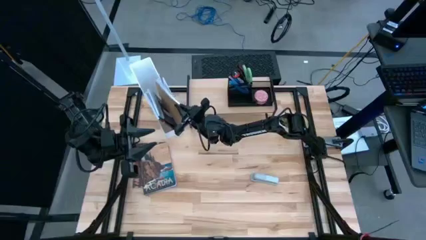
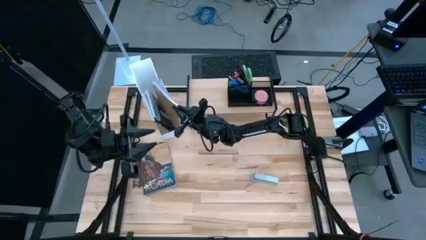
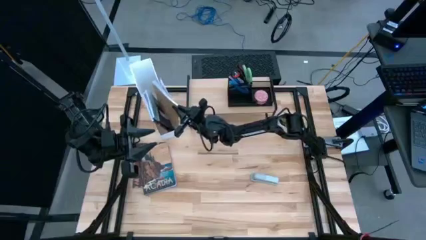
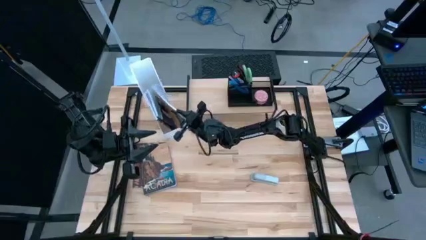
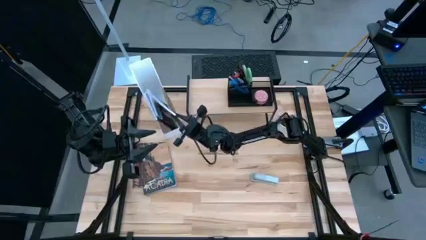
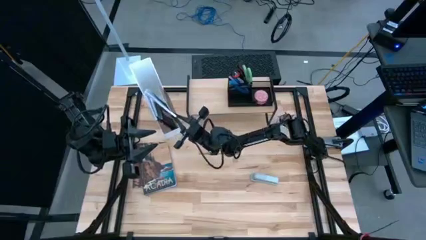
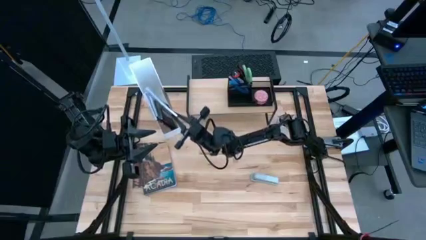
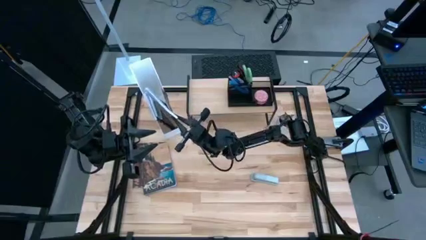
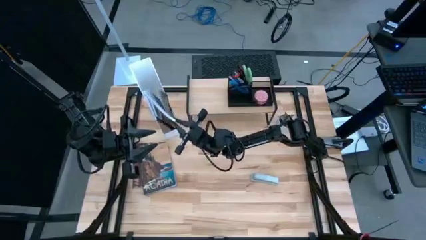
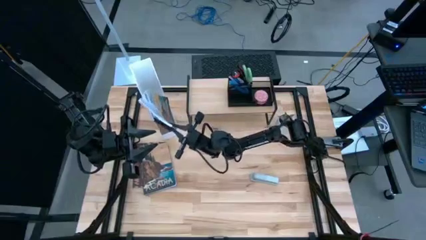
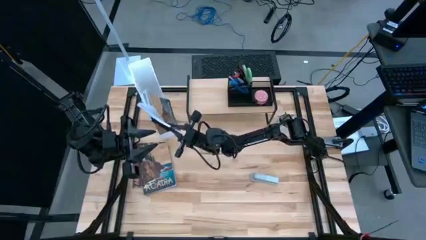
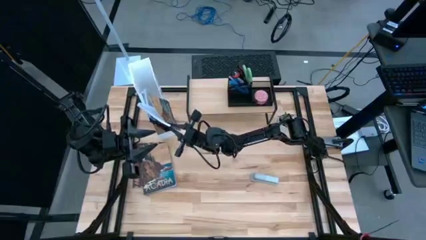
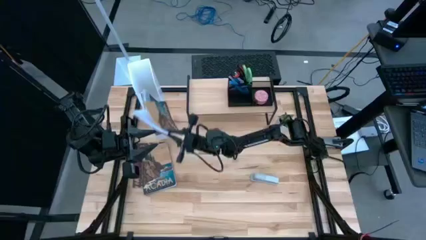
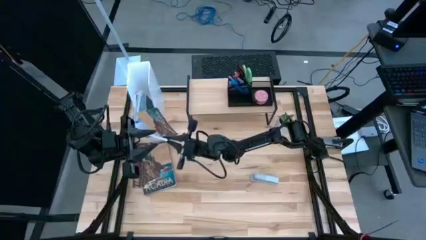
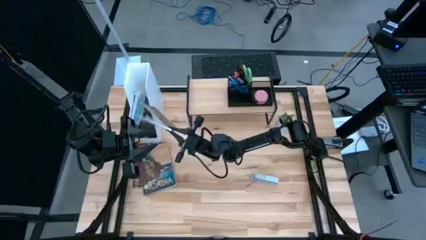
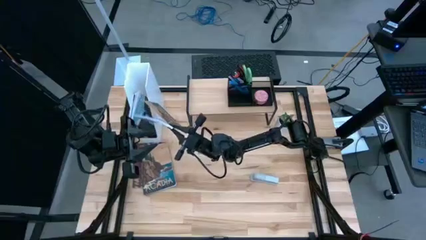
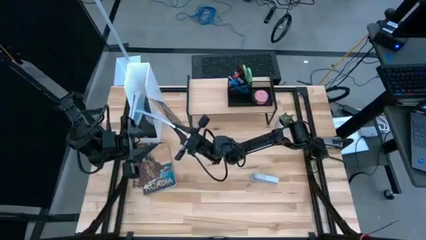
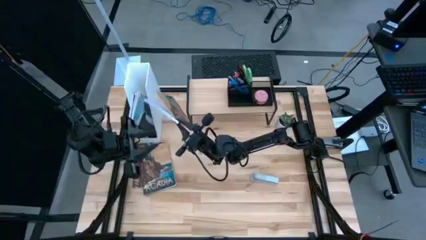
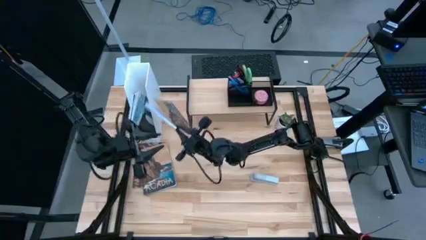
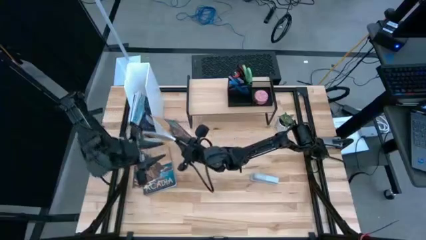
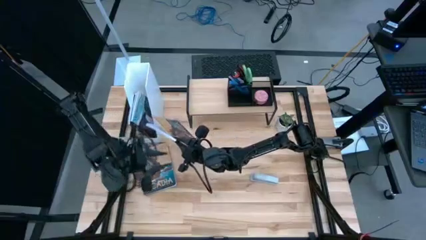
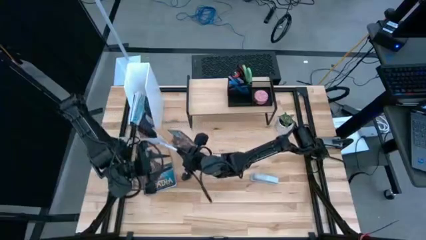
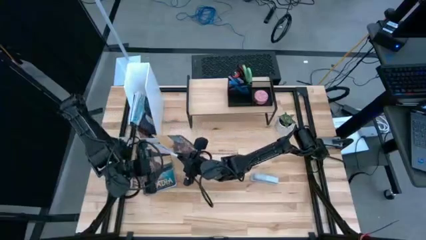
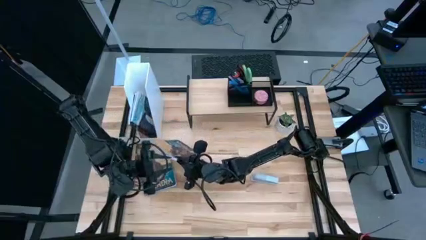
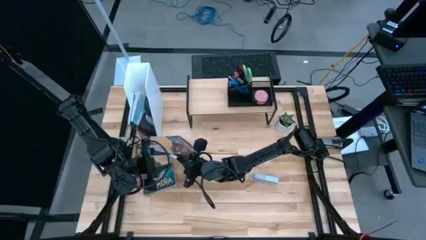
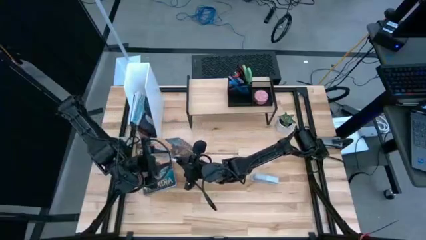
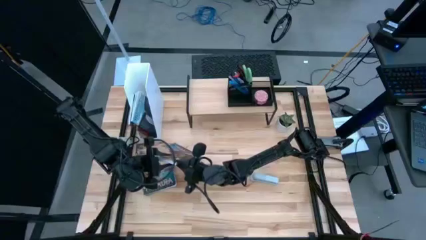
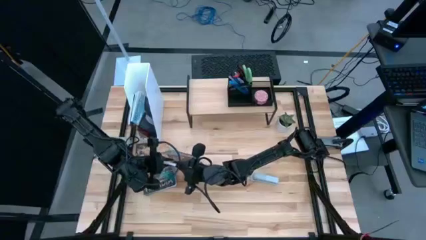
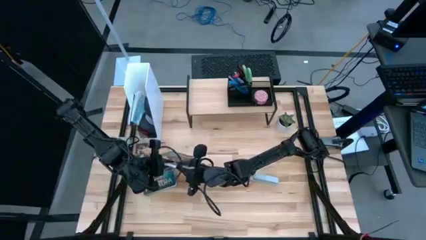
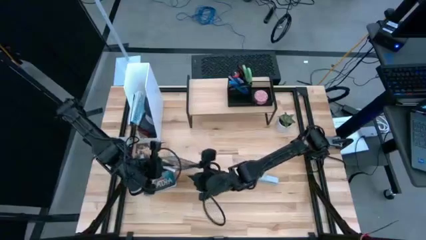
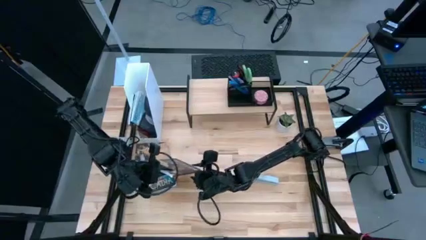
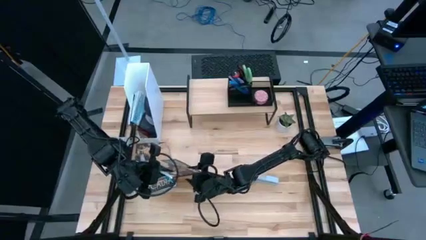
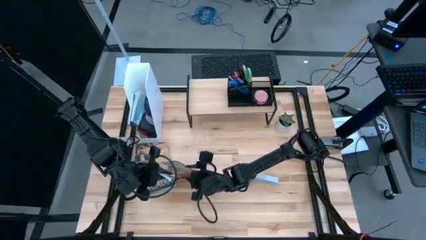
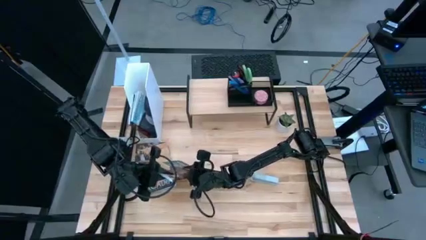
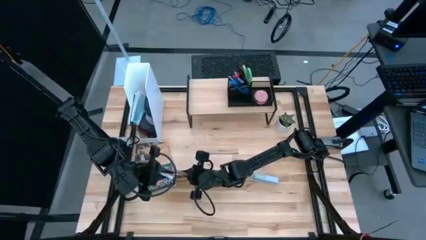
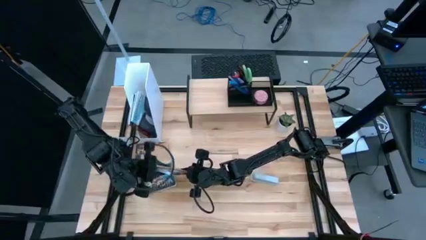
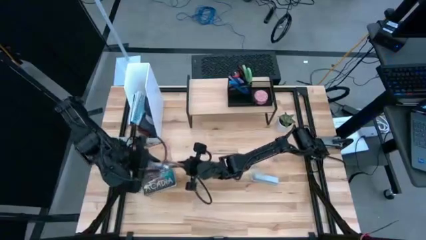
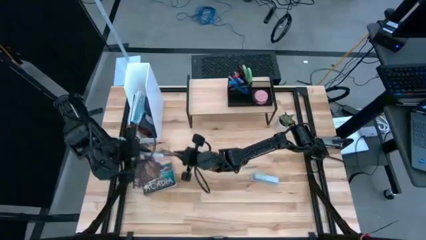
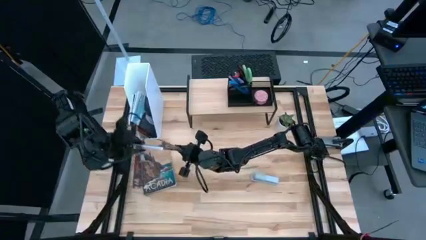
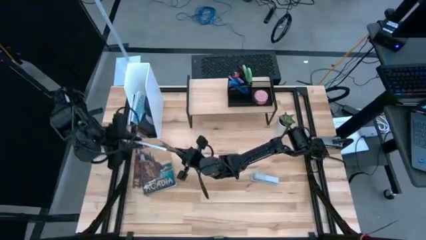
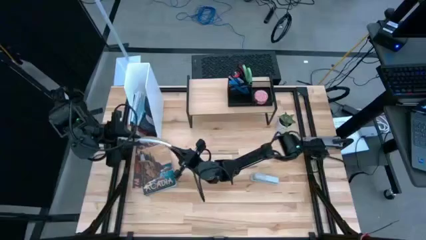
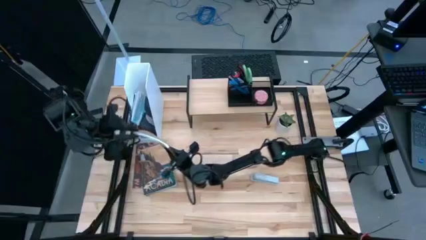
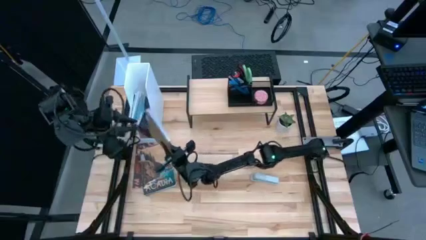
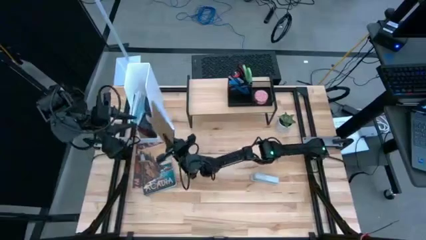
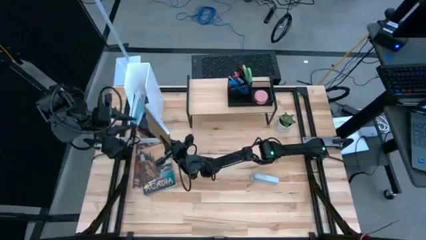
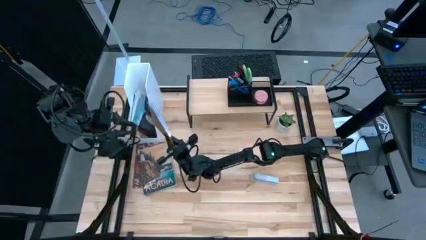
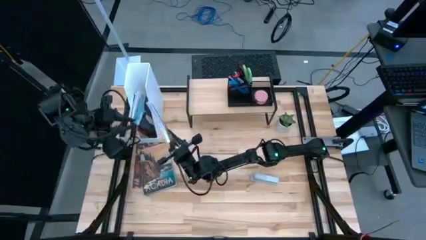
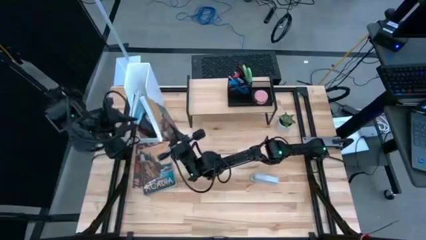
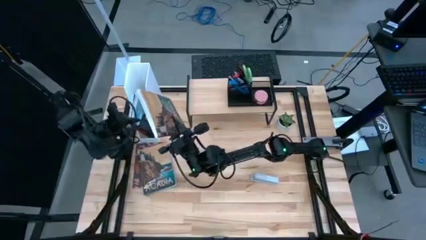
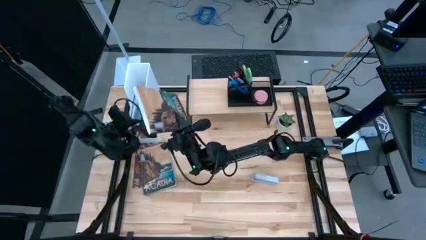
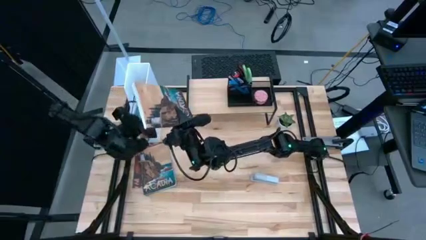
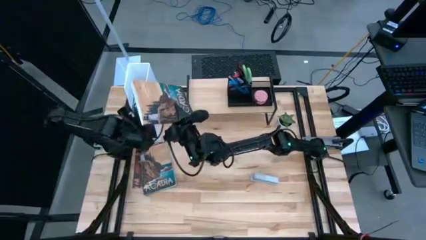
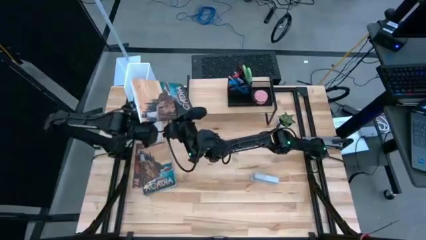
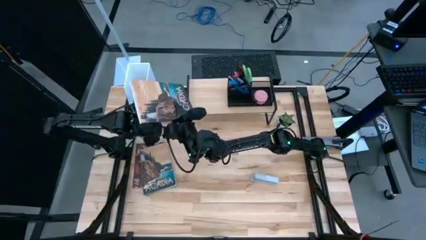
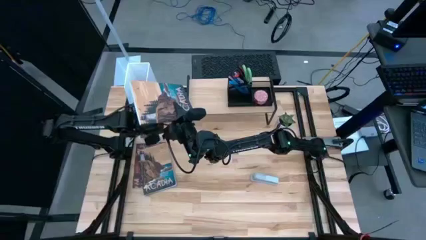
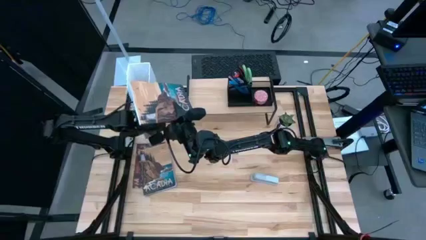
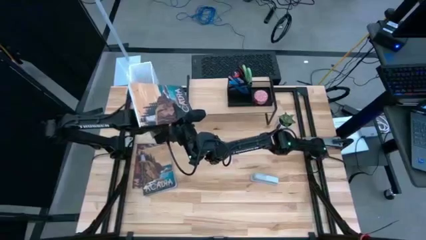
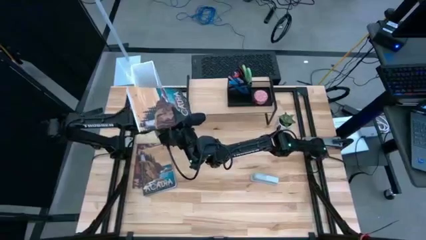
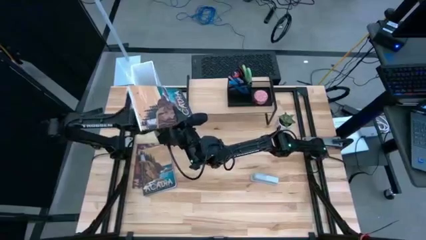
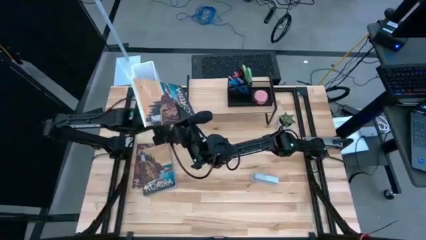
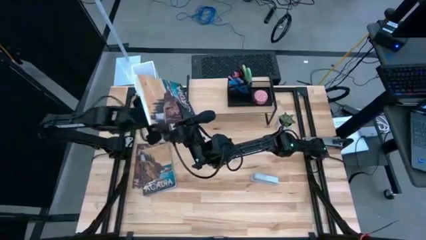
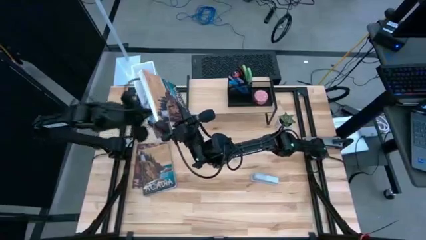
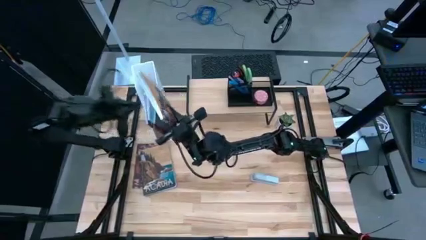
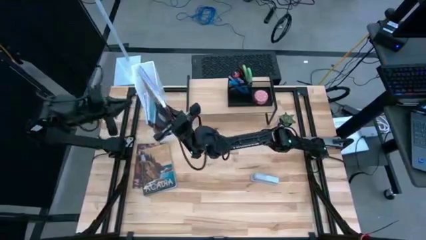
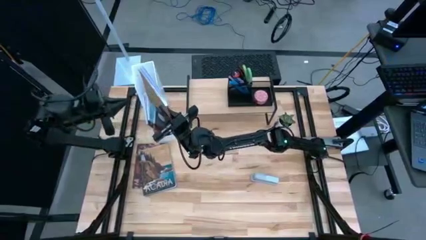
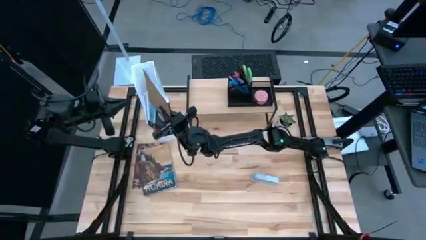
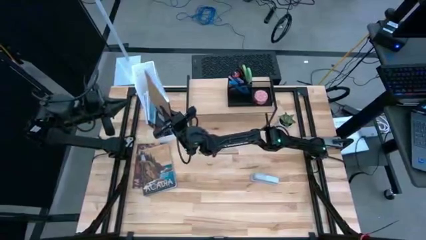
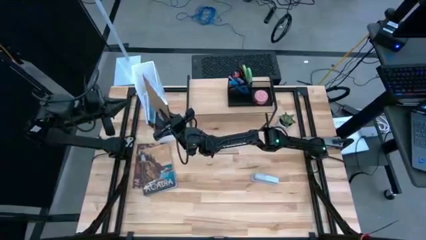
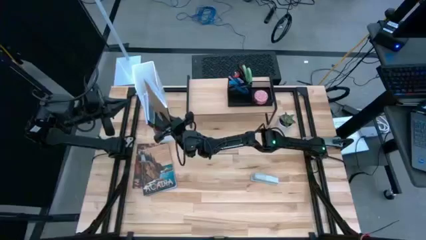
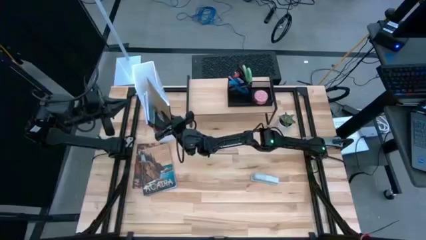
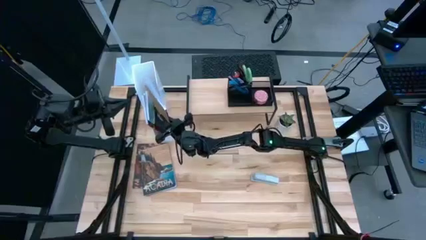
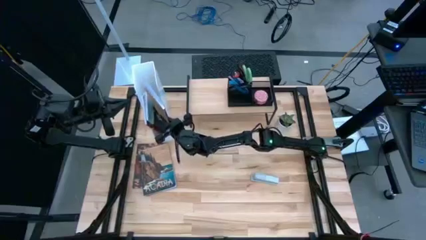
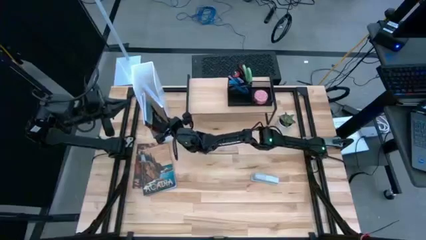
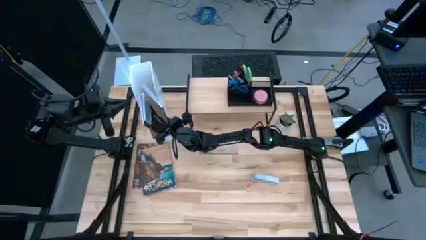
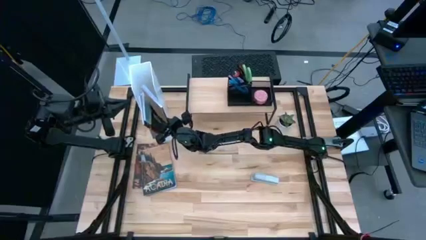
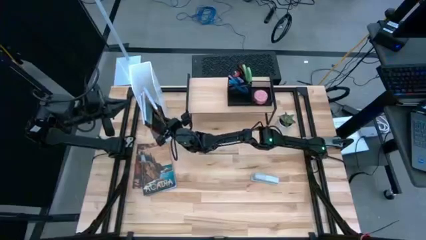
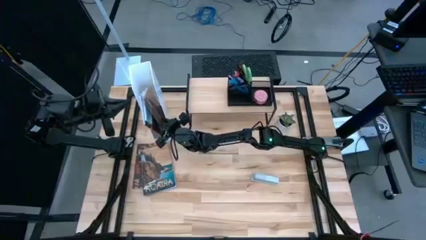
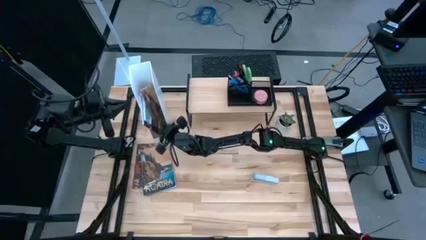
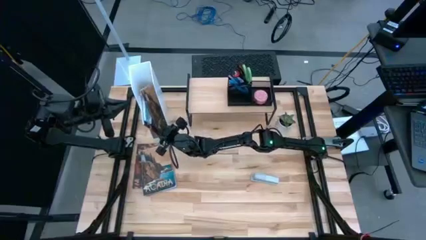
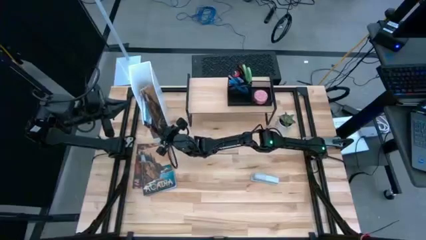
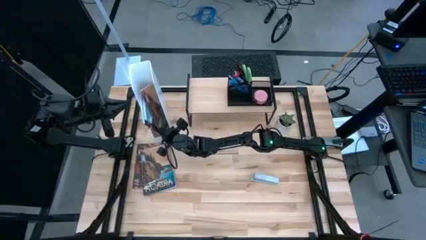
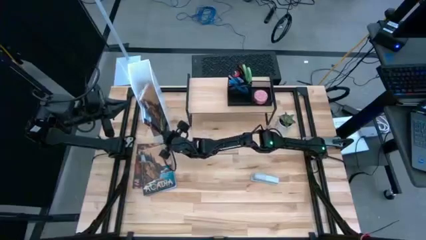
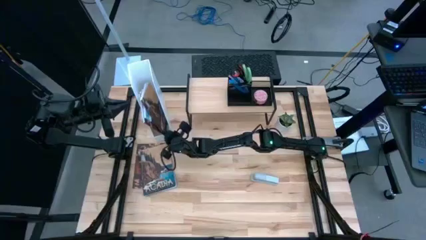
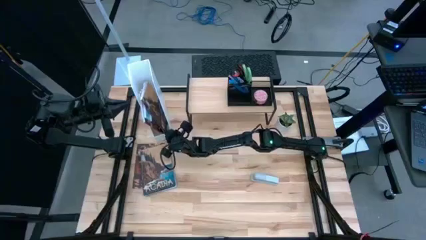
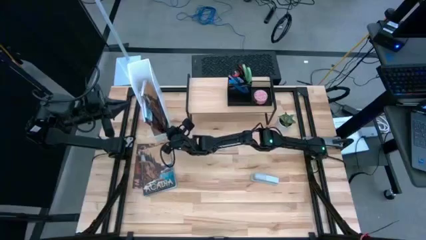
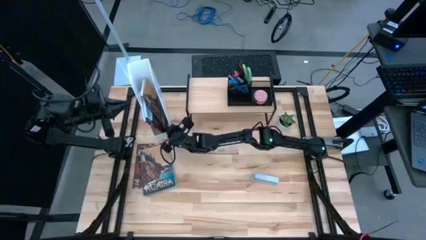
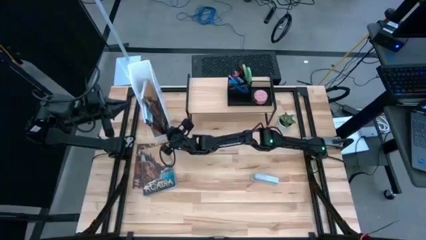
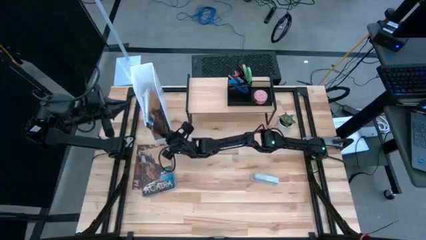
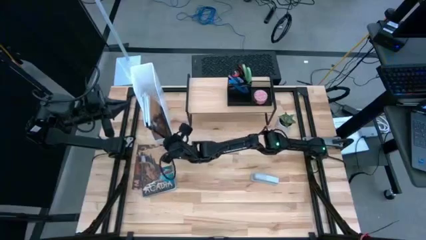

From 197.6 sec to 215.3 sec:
Task: Stock shelves
Put the brown book into the white bookshelf
